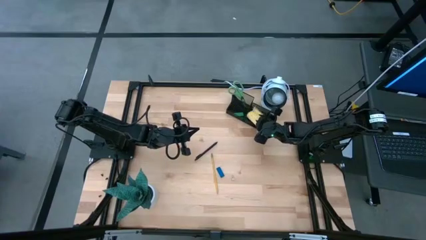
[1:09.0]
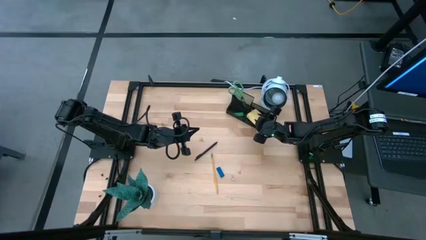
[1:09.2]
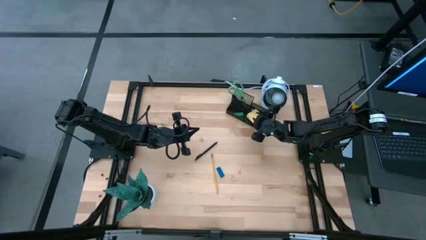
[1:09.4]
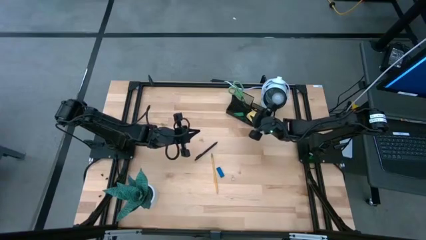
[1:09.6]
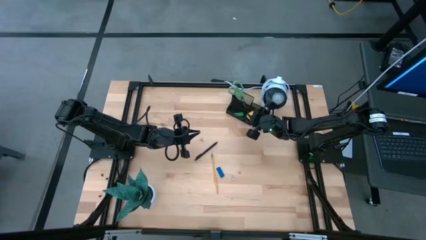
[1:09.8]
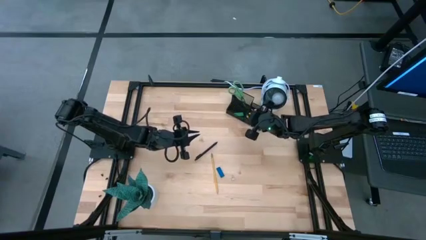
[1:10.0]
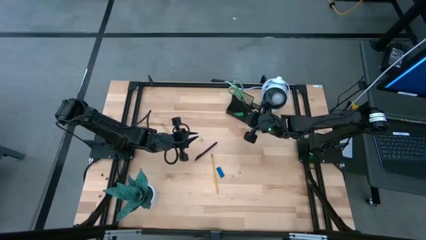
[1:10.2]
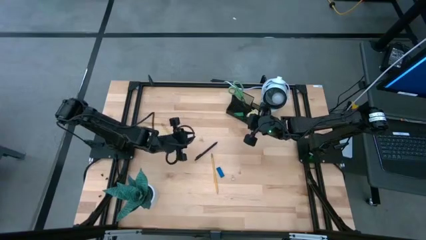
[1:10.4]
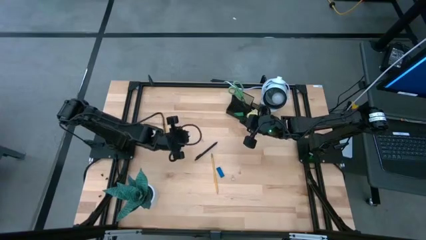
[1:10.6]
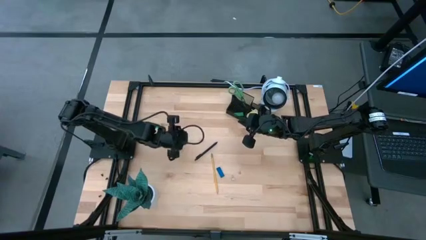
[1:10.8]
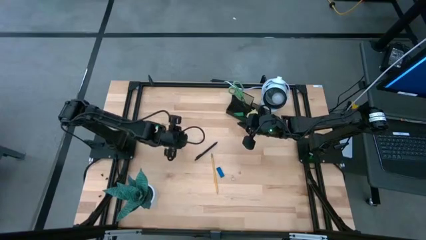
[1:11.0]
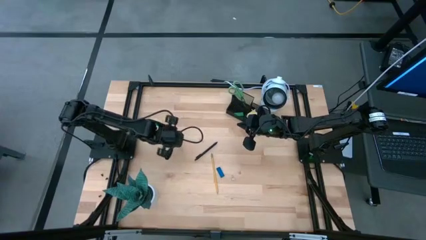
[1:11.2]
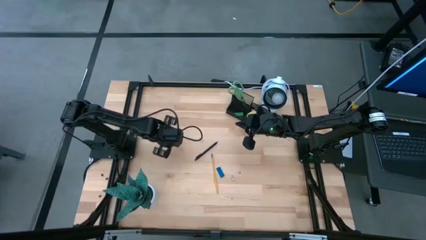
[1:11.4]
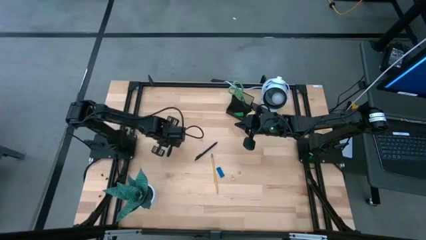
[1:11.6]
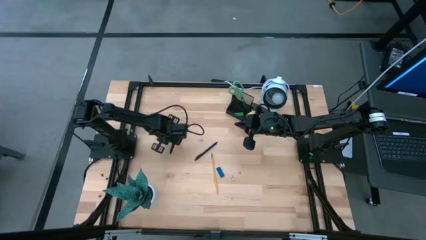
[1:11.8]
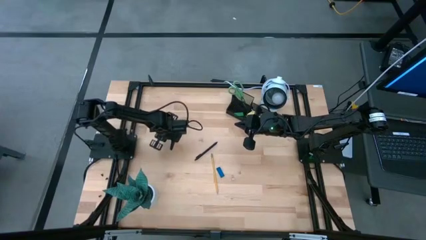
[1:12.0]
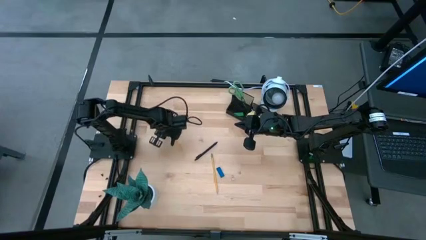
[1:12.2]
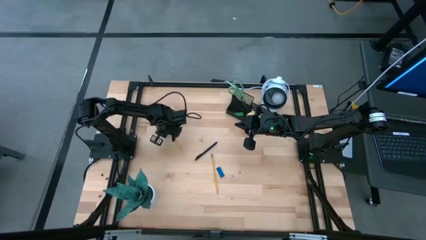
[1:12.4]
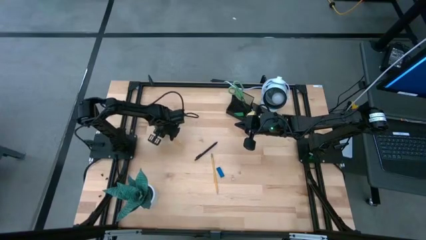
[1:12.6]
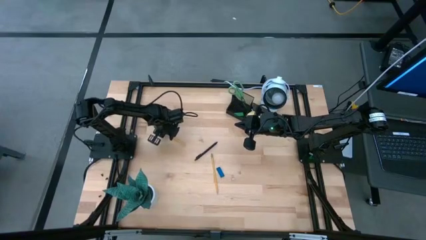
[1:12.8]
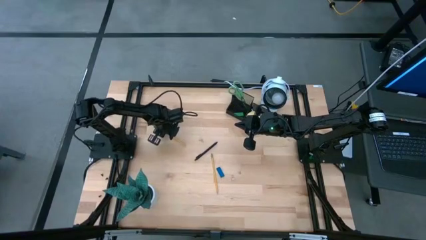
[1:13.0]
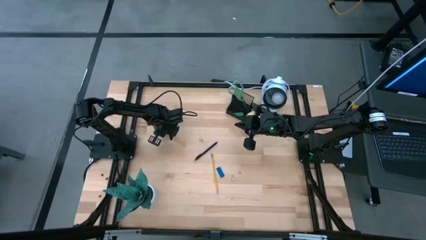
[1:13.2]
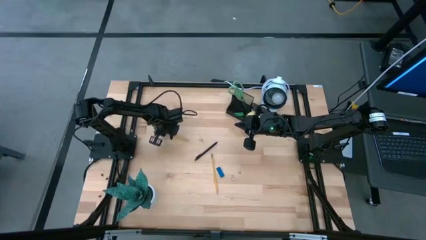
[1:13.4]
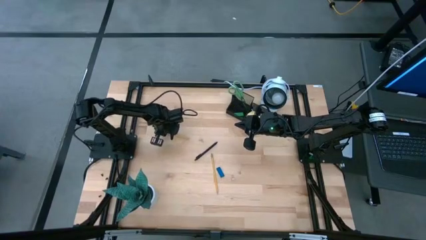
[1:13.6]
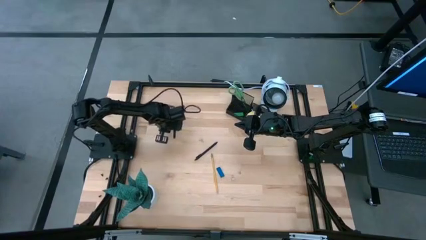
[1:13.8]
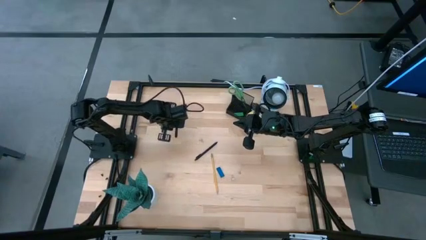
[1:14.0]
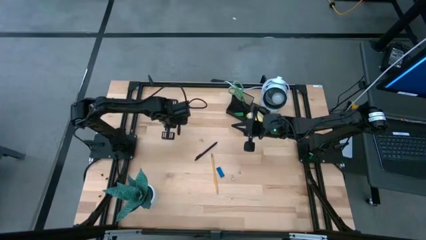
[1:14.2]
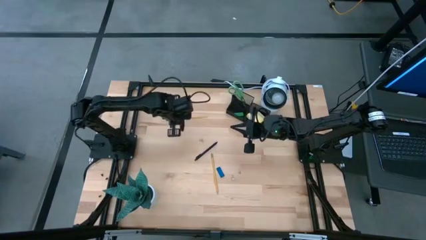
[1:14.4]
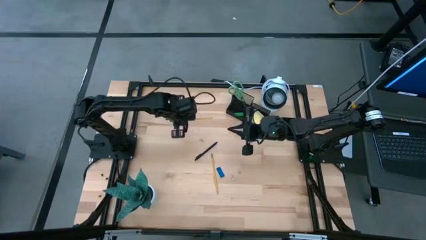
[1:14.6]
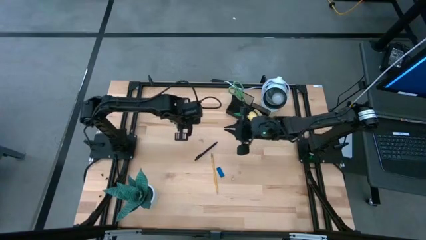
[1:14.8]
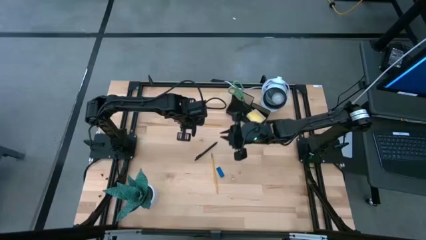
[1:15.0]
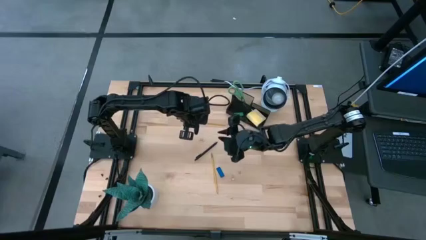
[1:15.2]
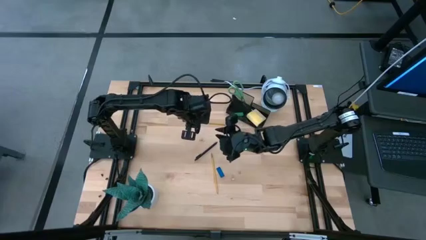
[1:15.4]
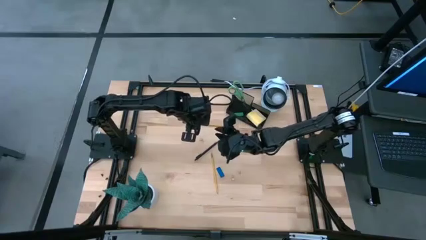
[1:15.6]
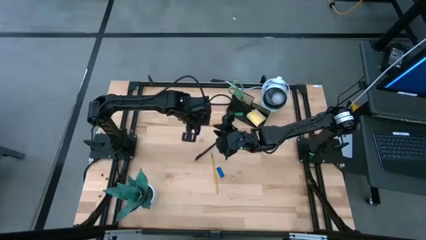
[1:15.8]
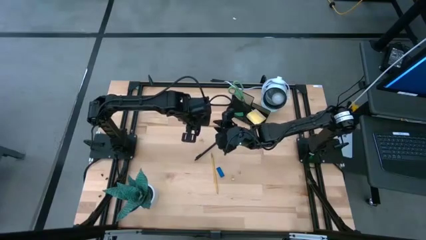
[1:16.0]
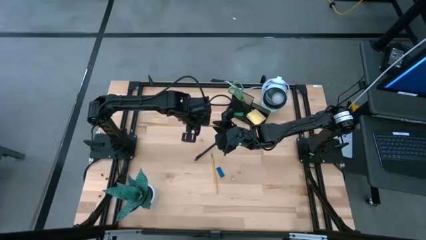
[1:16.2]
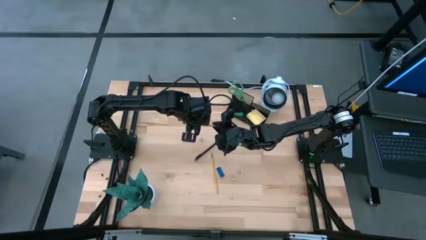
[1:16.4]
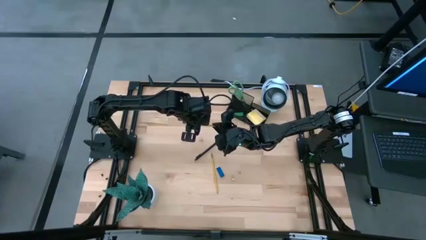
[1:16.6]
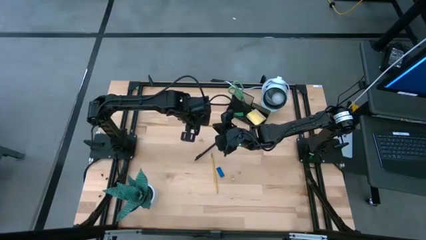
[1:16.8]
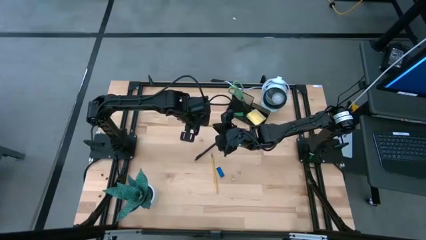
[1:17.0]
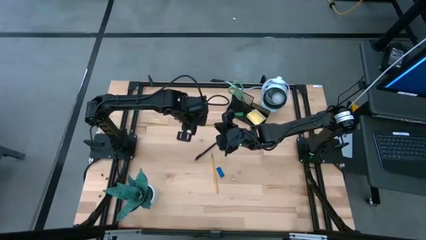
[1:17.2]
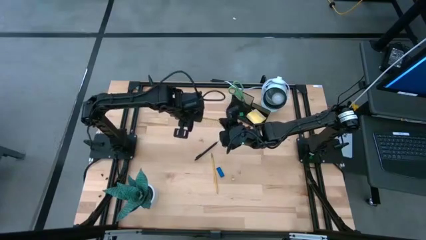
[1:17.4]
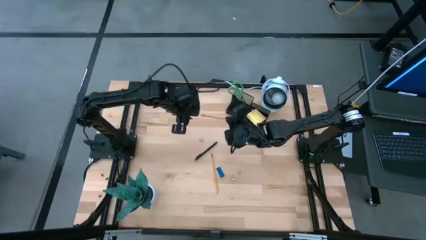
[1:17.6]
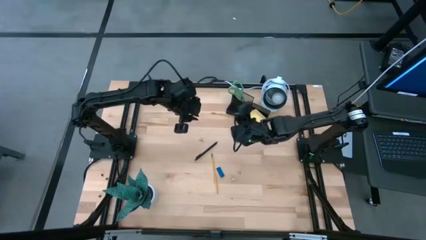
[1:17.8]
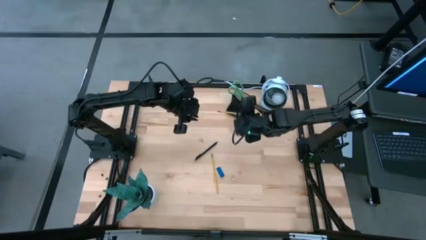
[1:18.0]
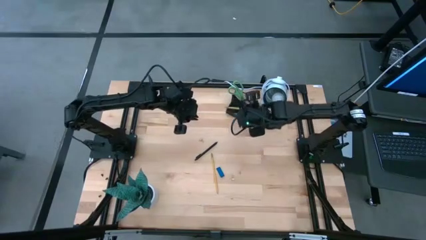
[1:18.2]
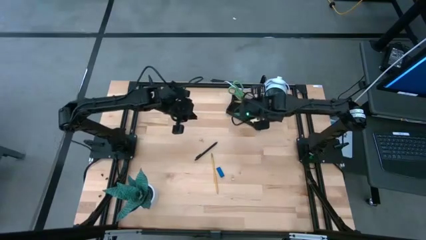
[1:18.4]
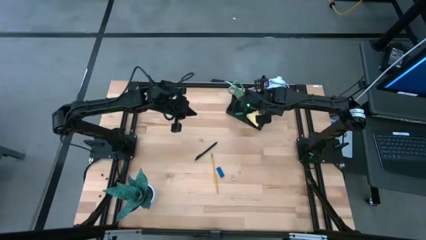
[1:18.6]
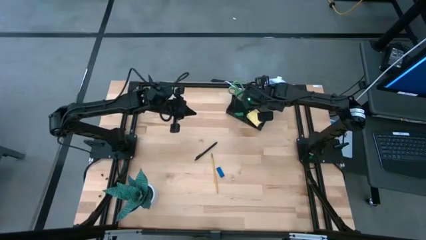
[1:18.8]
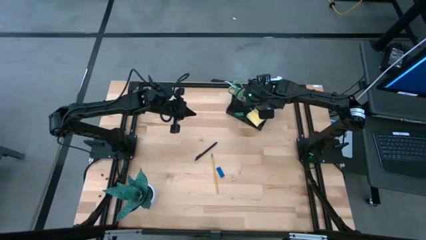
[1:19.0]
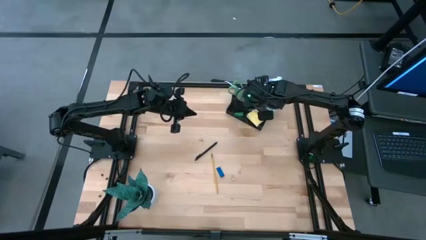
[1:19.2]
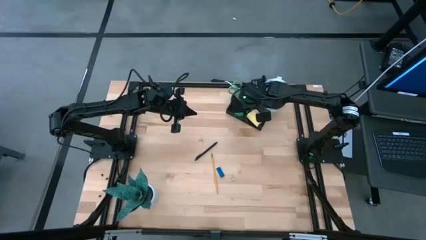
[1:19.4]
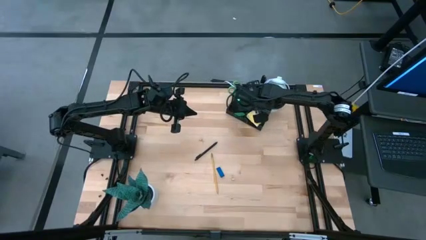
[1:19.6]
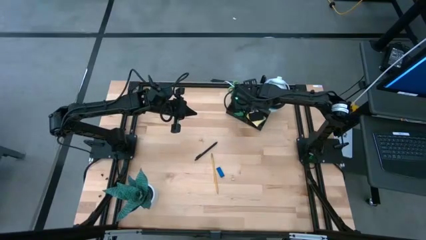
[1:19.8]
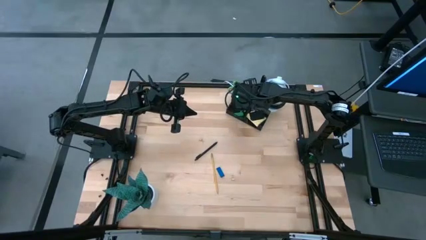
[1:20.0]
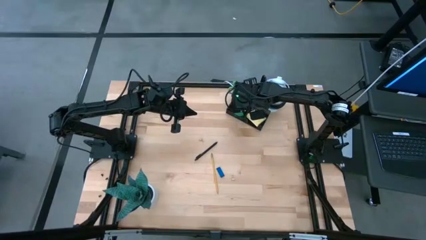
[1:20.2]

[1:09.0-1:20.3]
Task: Pick and place office supplies into organizer
Put the top yellow pencil into the metal mesh desk organizer

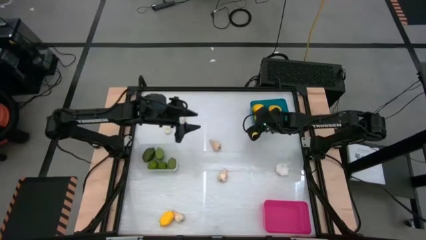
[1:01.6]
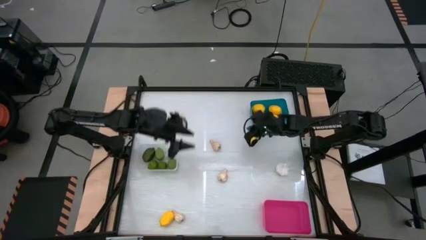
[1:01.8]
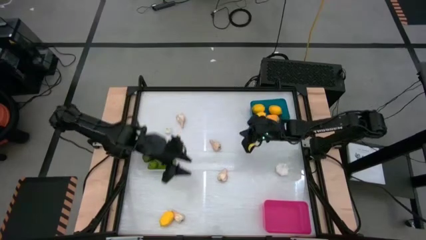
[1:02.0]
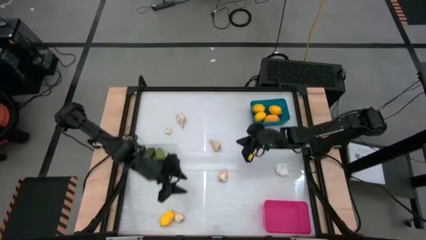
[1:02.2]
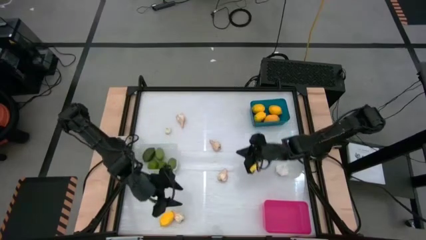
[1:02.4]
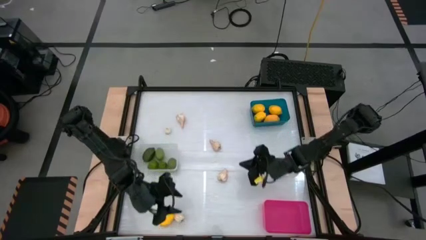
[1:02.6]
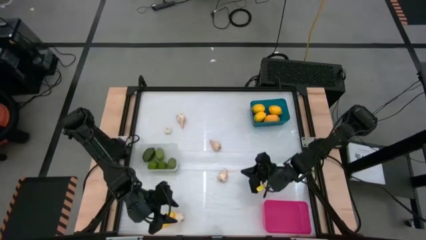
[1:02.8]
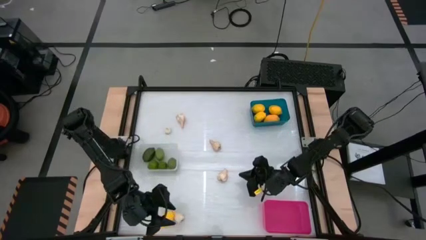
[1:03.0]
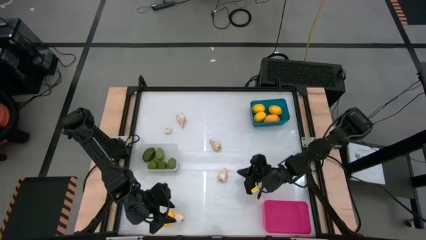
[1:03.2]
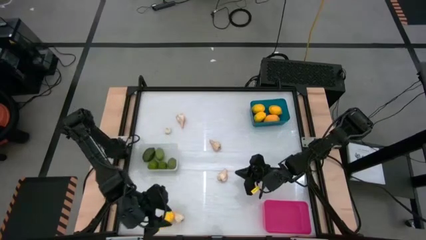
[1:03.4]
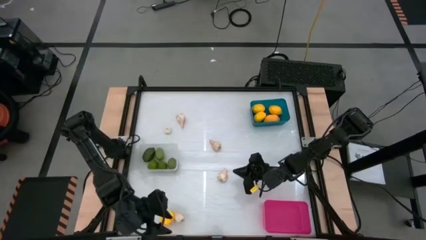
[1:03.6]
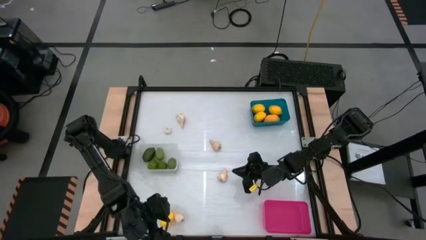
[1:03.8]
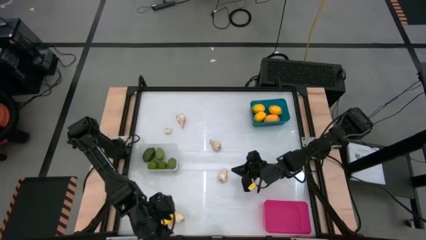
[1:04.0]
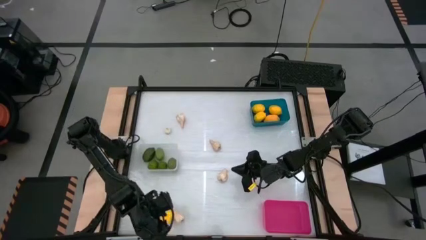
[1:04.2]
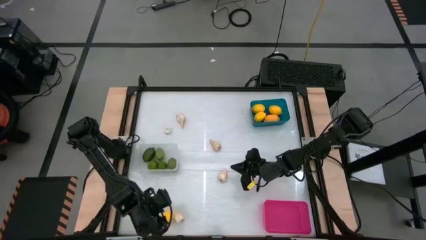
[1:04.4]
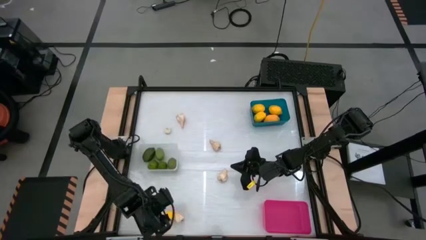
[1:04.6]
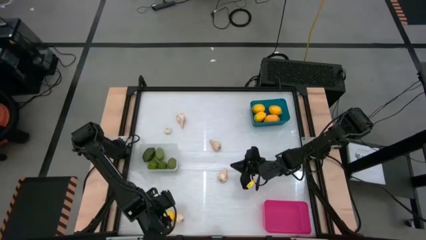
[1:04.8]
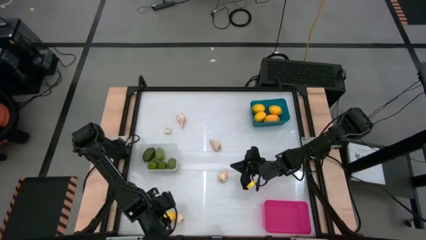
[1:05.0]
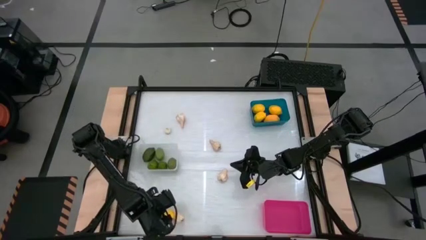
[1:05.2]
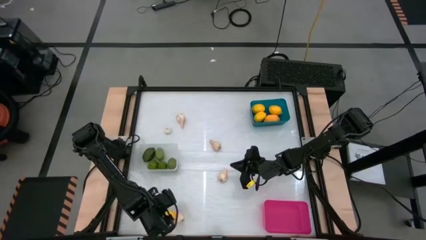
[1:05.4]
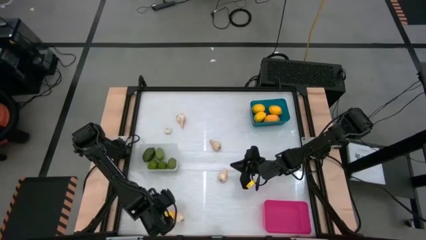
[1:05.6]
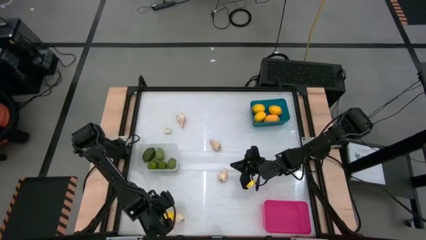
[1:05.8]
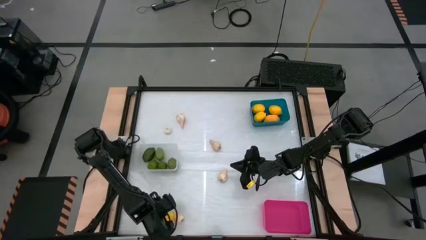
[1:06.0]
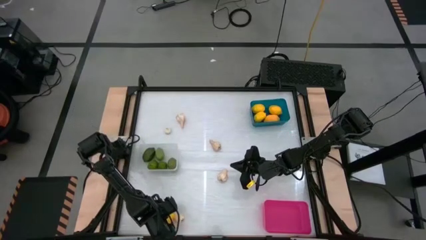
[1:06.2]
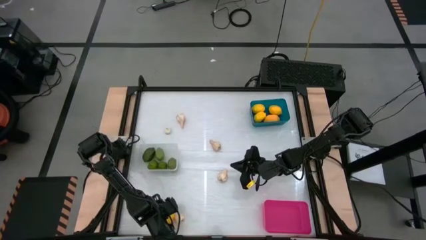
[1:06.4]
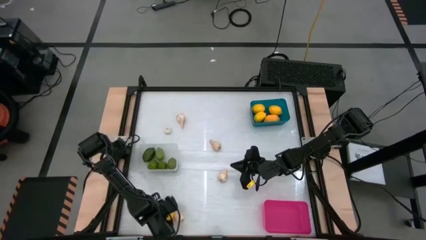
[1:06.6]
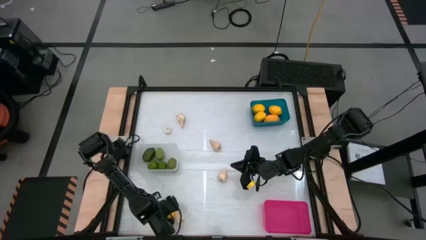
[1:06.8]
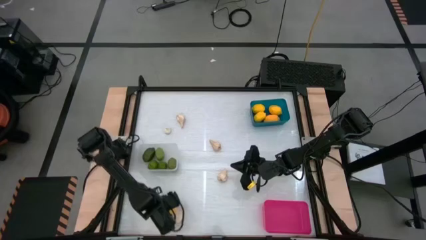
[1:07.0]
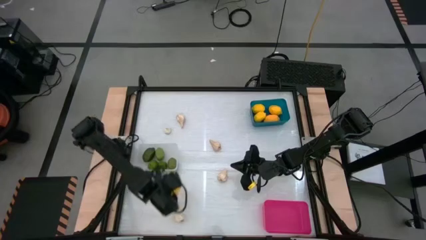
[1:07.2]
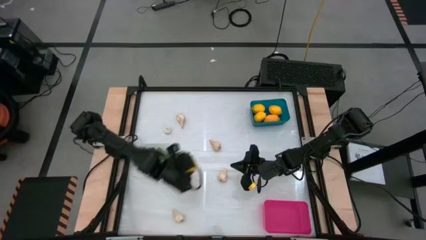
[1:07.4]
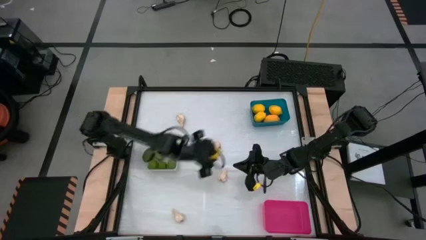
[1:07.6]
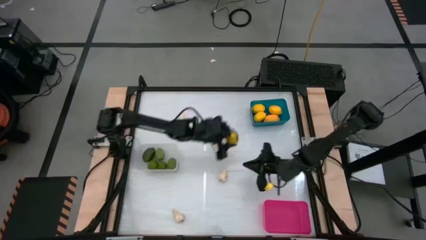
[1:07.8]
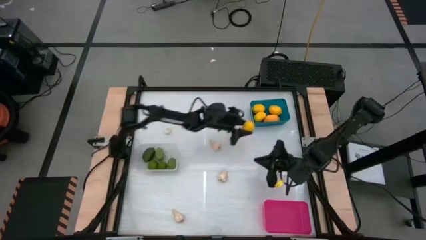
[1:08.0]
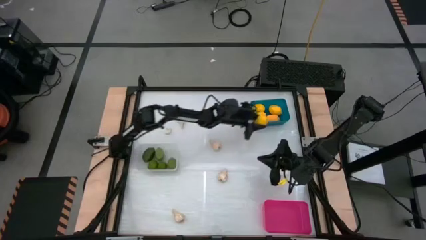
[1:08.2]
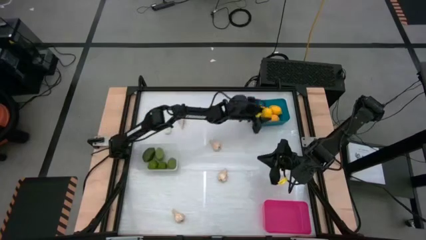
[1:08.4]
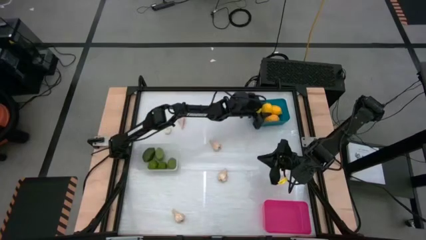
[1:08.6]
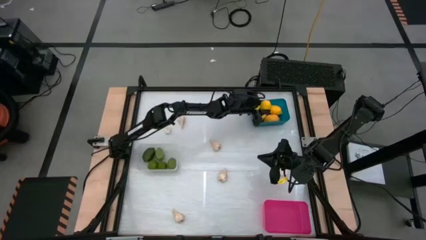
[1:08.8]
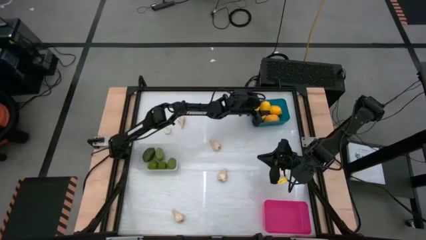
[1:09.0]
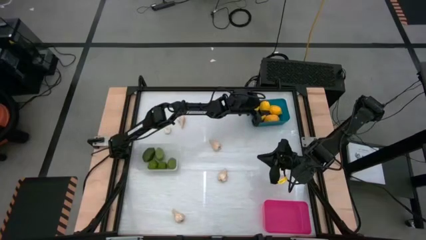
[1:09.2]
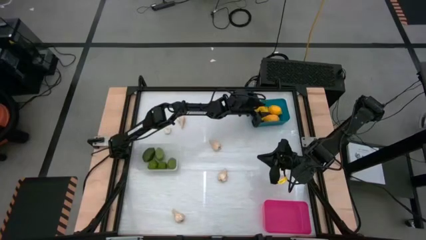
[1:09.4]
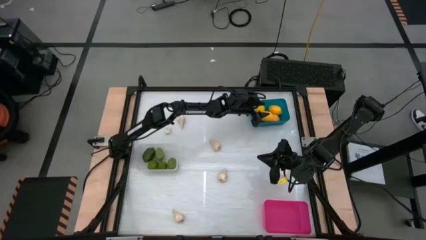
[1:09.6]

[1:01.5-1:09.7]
Task: Sort produce into baskets
Put the yellow lemon into the blue bin
